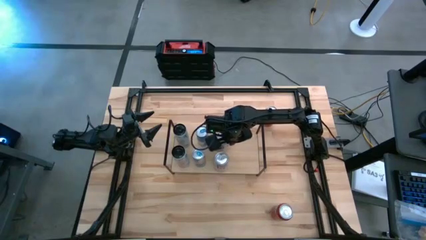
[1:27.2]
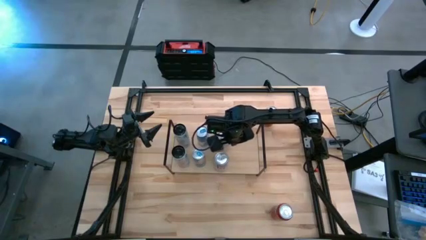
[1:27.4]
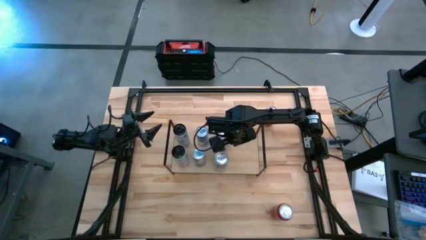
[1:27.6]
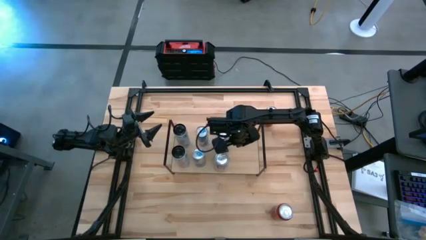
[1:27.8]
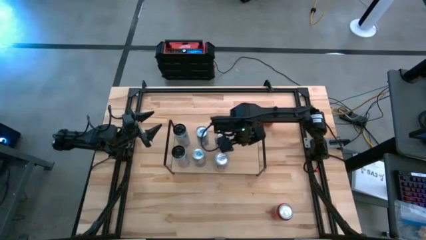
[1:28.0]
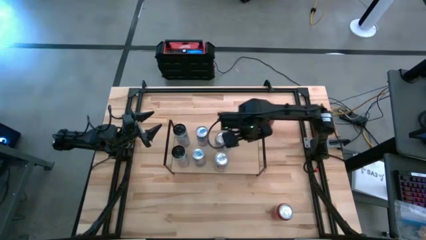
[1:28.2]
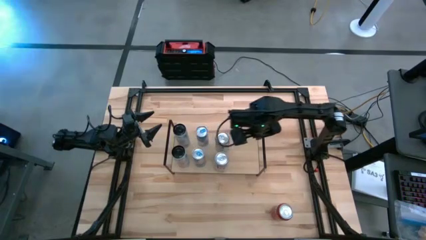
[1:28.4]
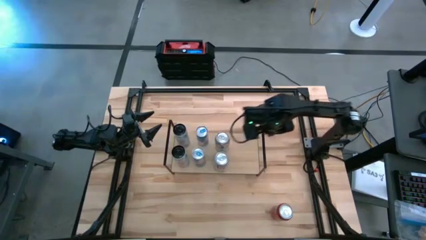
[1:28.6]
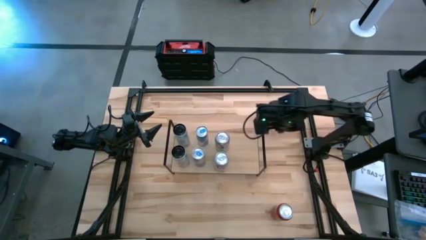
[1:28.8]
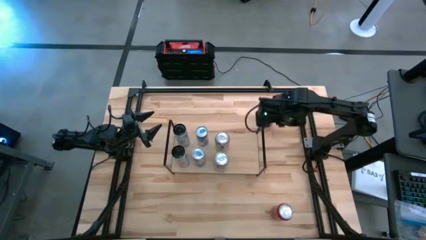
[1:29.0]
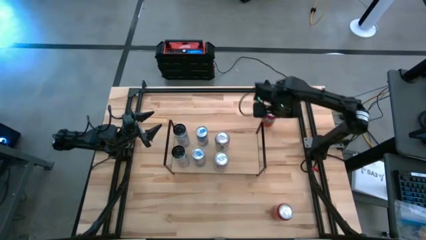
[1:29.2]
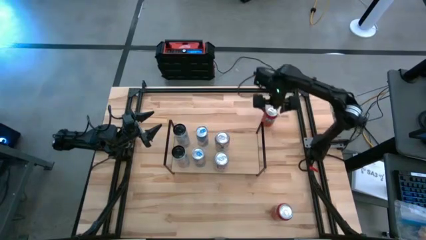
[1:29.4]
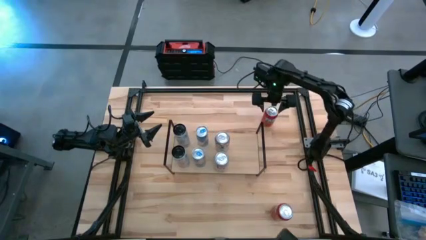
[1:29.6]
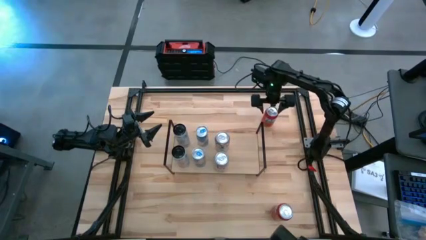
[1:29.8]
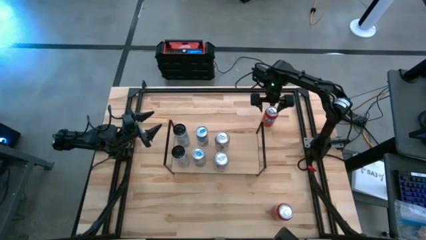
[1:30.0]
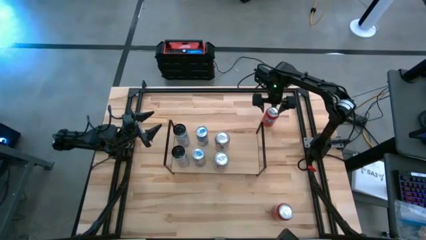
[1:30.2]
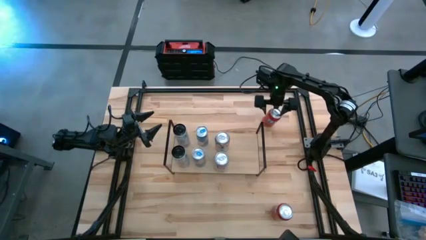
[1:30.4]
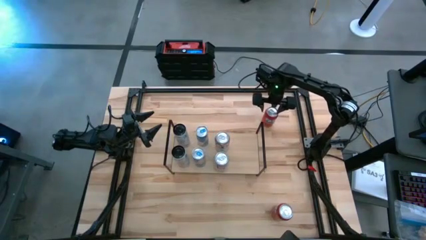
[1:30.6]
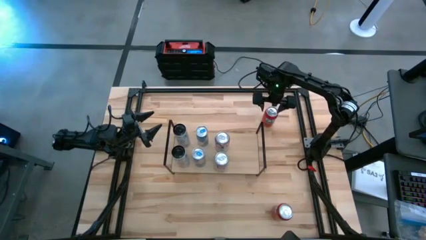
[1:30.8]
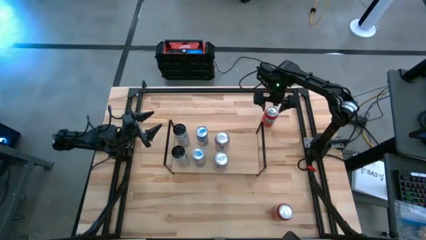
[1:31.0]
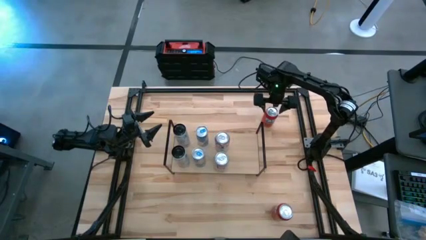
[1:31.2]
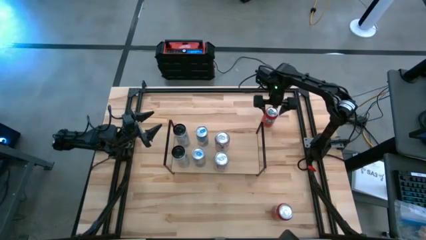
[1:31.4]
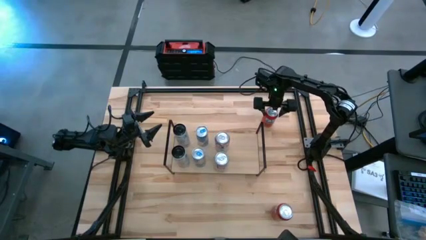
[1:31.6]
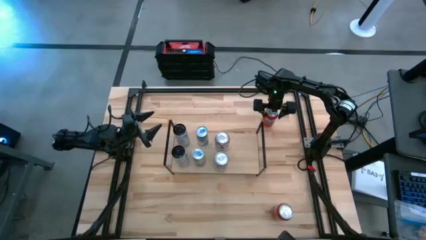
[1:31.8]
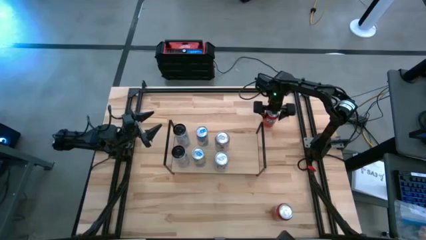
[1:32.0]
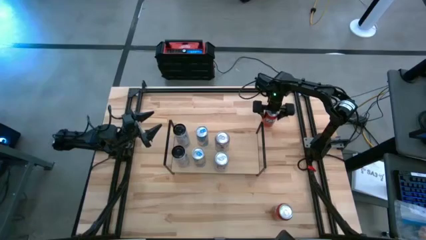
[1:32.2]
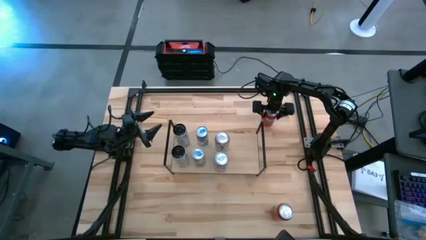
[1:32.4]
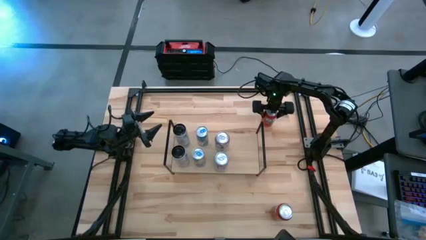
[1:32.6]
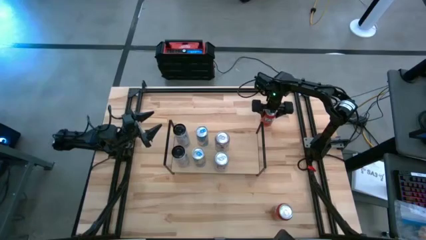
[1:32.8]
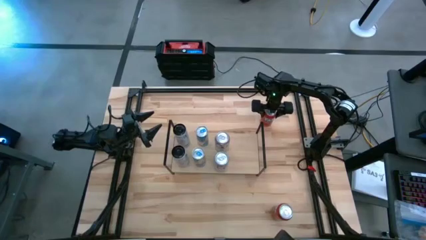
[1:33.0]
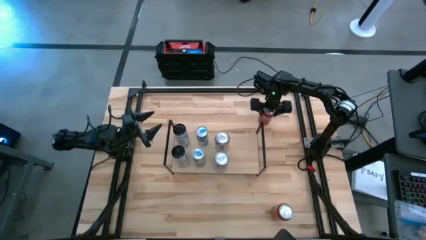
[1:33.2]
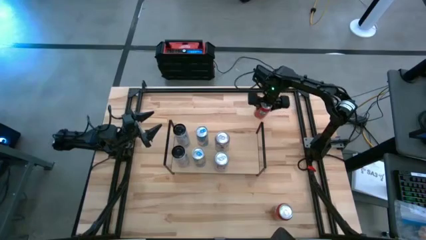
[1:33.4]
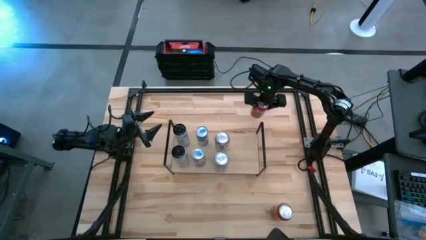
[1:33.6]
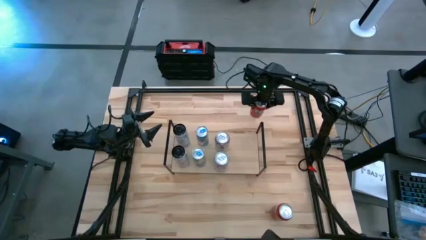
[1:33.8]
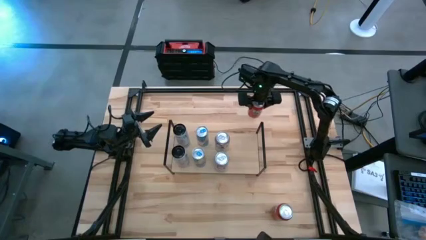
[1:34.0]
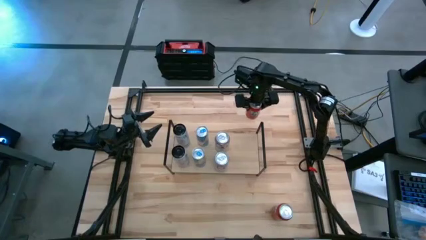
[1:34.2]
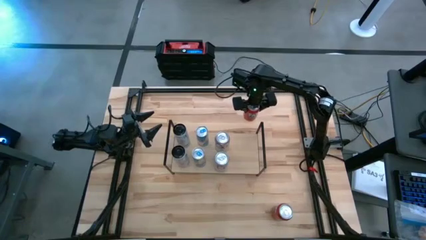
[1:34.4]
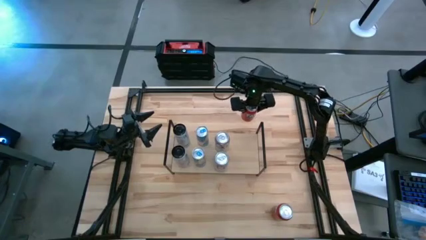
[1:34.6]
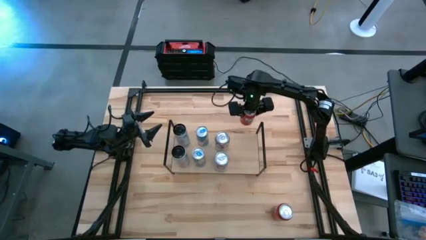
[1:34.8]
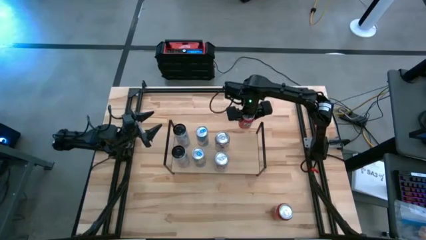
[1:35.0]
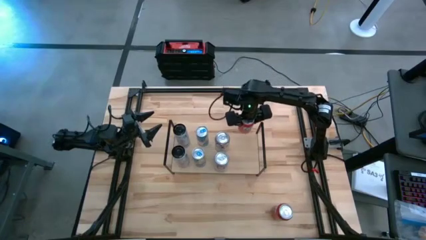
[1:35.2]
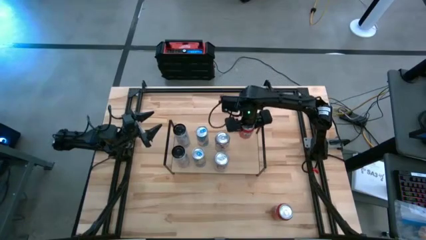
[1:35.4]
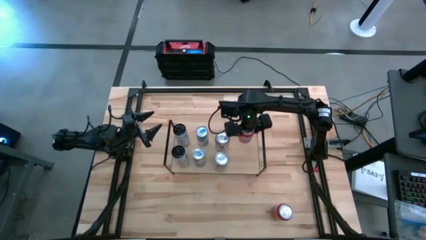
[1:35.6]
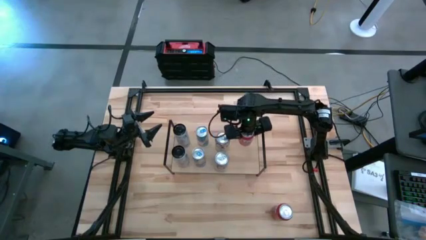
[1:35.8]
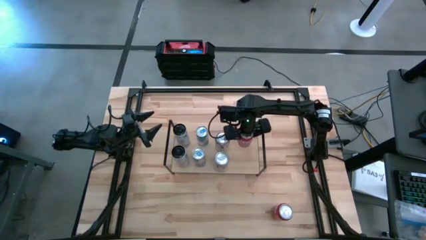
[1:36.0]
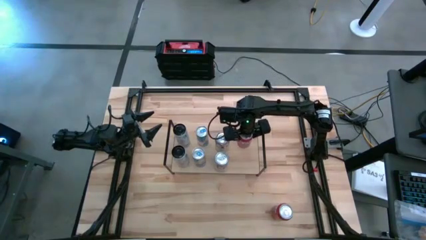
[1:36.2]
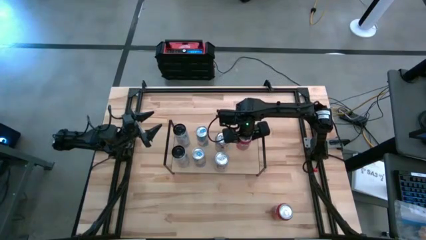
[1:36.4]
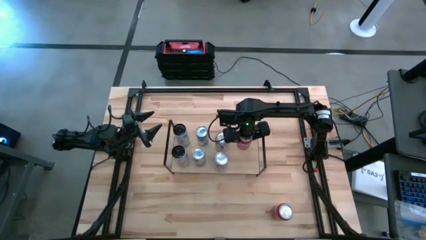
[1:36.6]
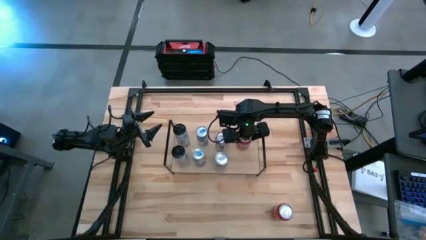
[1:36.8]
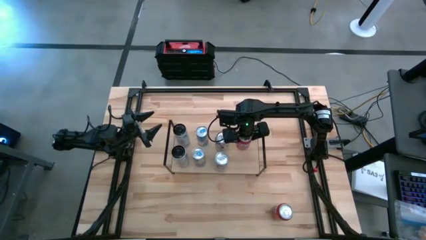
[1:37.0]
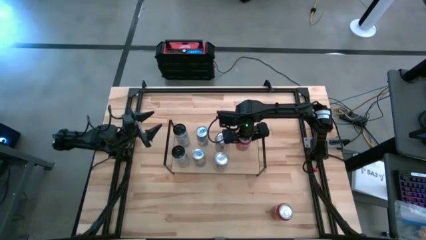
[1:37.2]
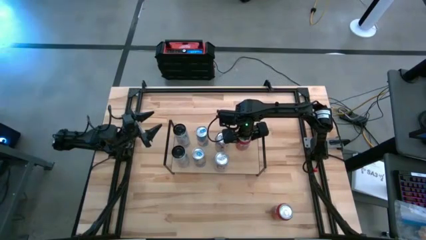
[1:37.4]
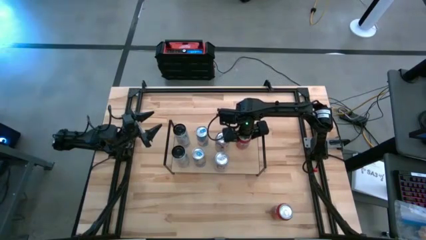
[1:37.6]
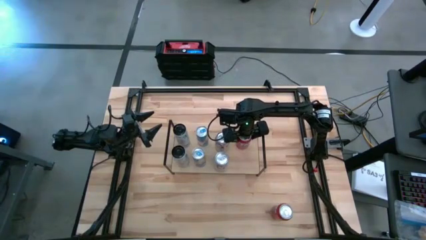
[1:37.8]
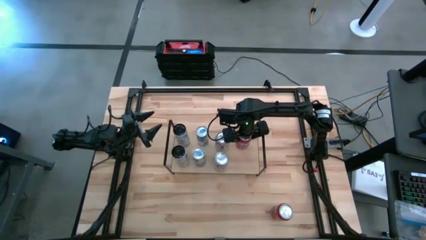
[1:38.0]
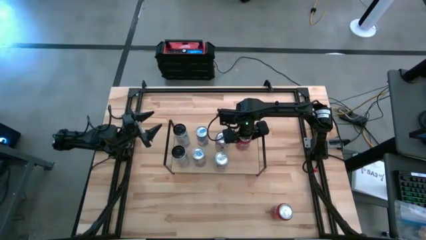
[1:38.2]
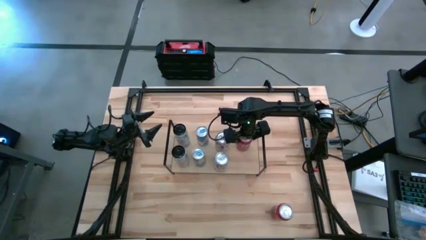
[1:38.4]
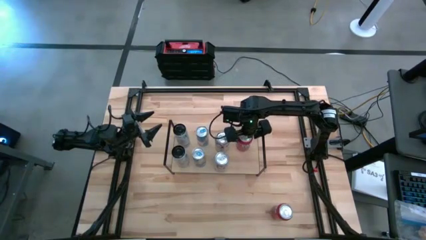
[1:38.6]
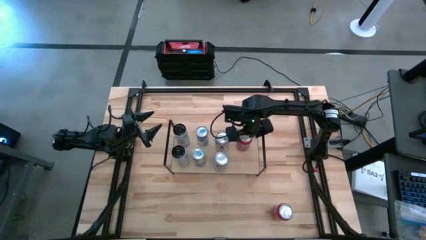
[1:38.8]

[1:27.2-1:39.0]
Task: Place canned beverage on shelf
Put the top red soda can on the shelf

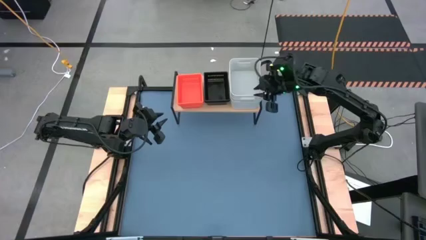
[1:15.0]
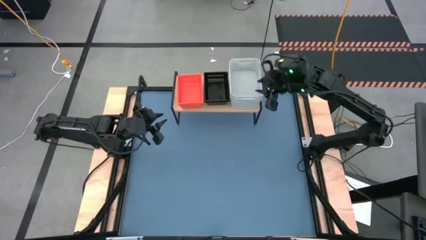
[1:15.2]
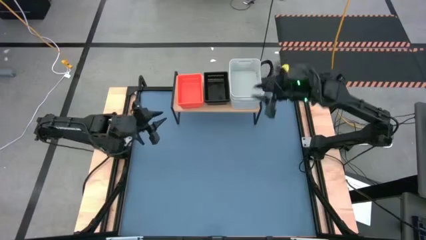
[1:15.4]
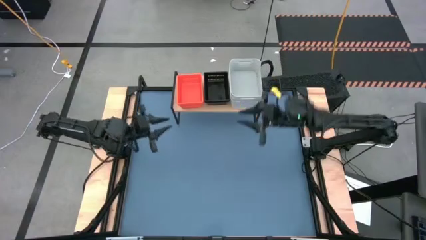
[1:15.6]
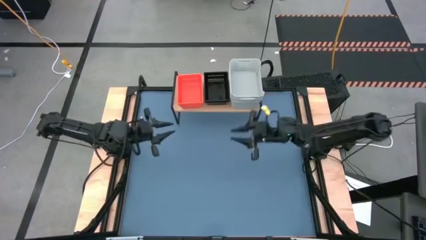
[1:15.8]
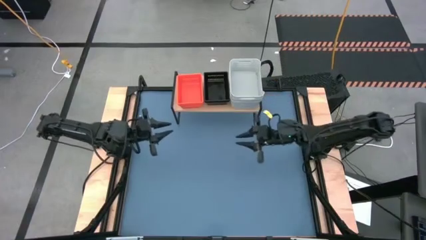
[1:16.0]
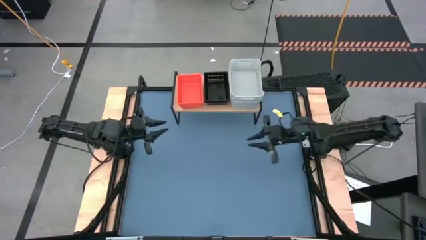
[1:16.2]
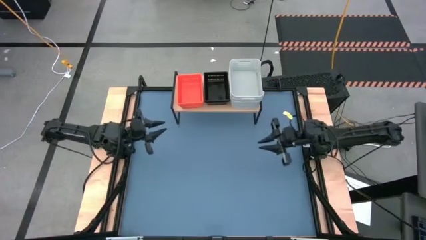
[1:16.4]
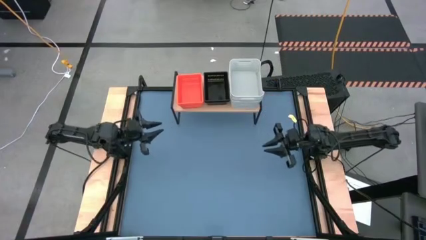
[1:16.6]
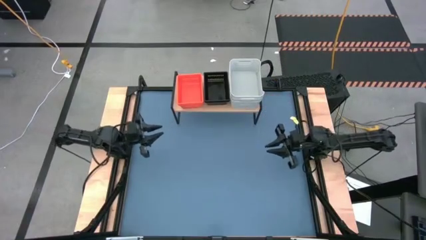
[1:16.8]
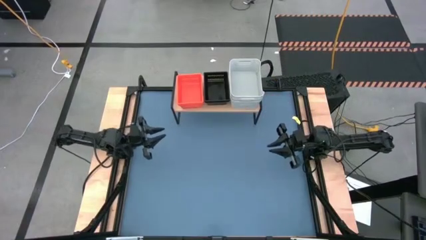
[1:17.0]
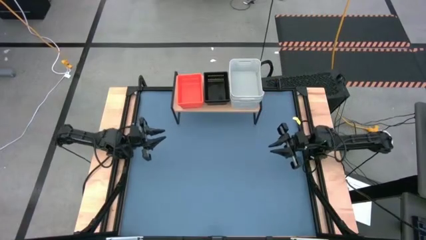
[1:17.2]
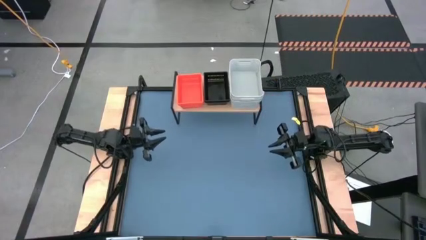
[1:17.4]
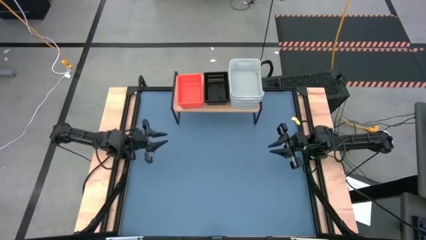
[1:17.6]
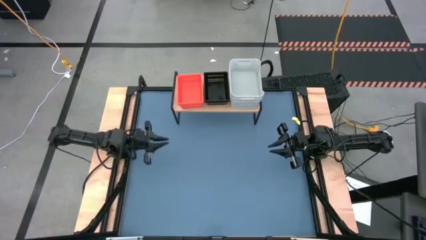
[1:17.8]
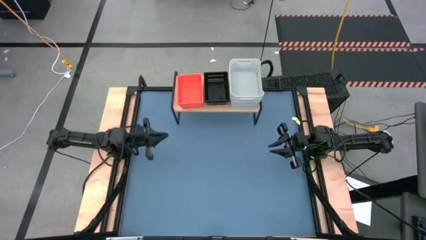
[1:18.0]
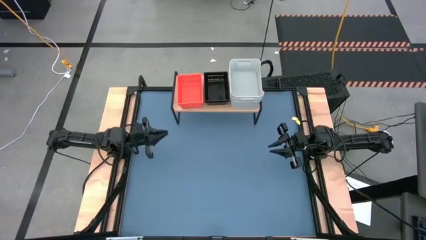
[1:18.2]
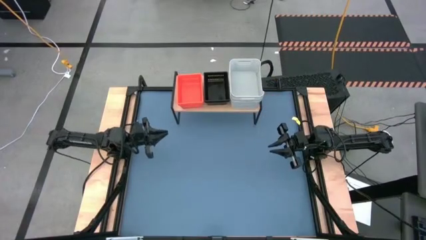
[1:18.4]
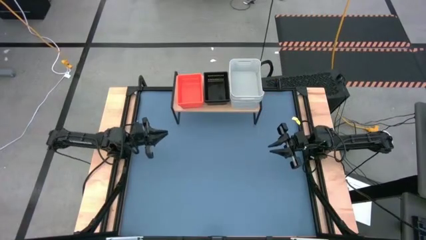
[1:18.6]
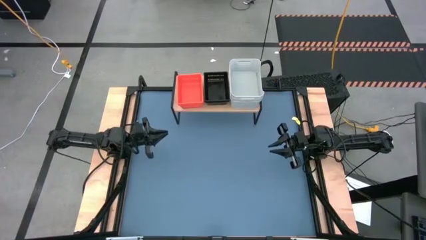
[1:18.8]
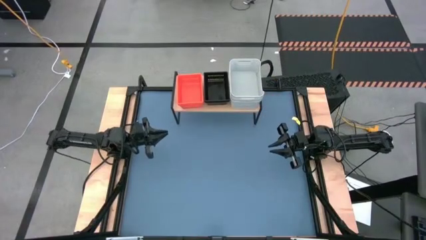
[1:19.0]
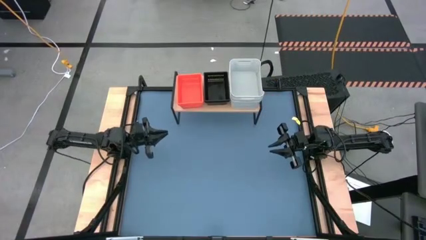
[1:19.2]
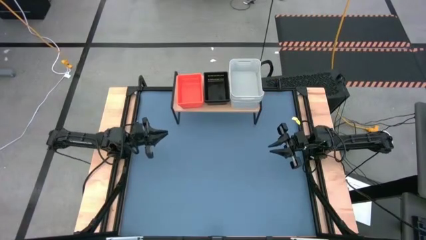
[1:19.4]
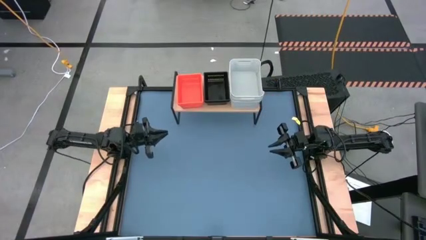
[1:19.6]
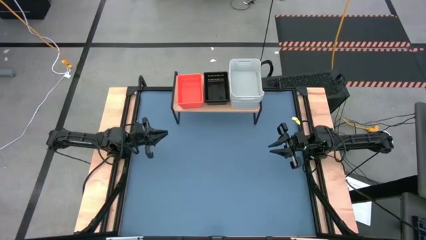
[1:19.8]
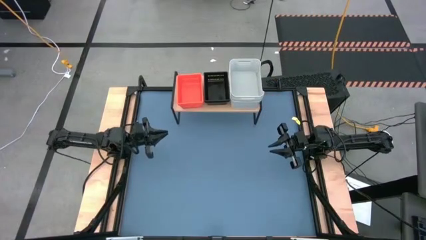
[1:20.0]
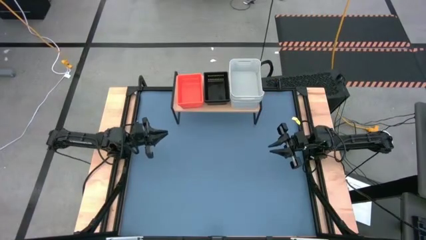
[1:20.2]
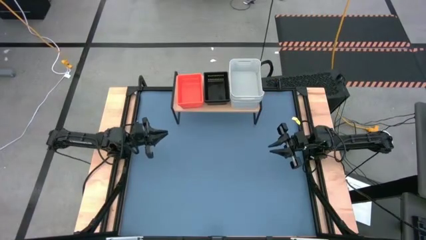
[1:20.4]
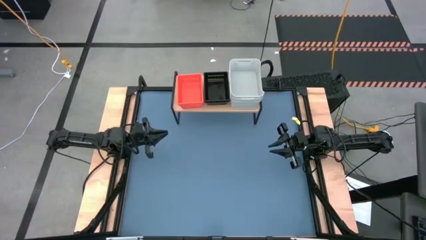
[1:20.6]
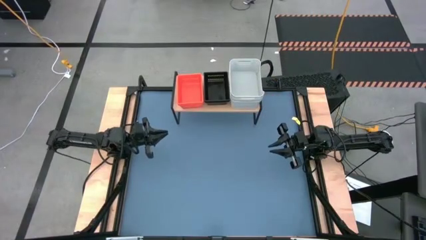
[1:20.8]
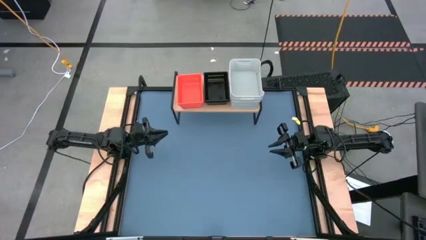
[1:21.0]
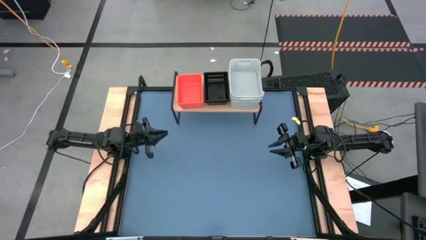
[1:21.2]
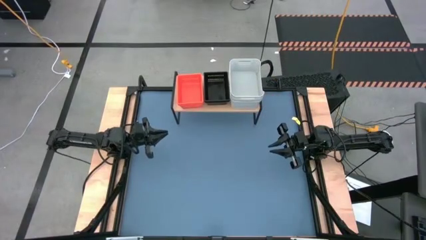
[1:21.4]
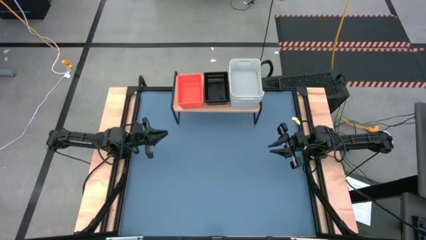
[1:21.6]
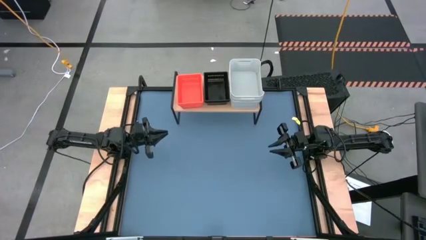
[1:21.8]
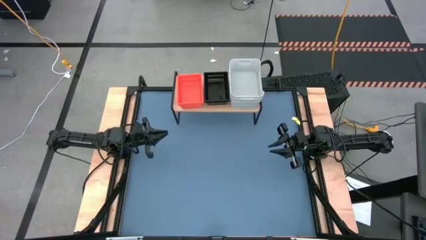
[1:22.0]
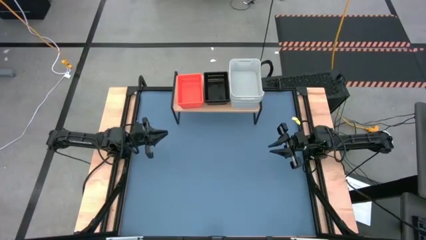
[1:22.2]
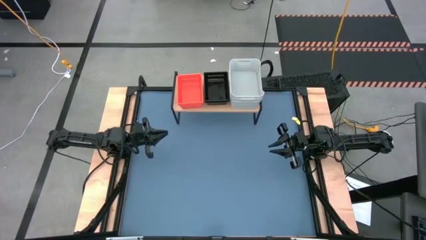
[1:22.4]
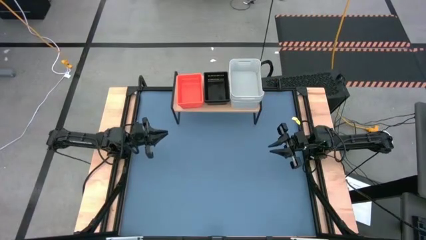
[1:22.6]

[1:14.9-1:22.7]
Task: Stack baskets on shelf by color
Return to Home Position
